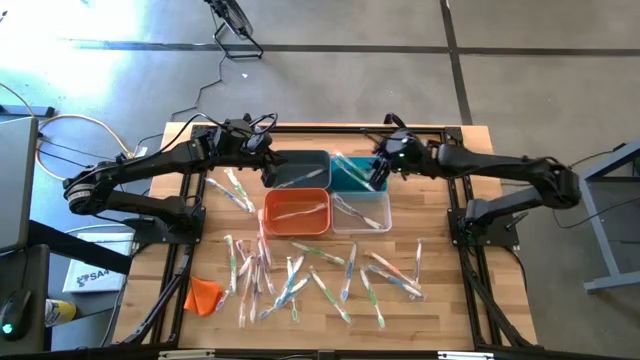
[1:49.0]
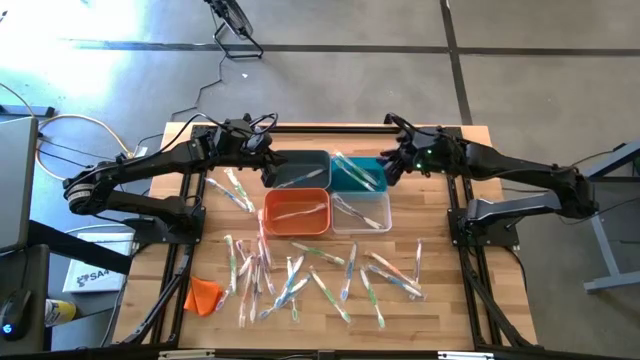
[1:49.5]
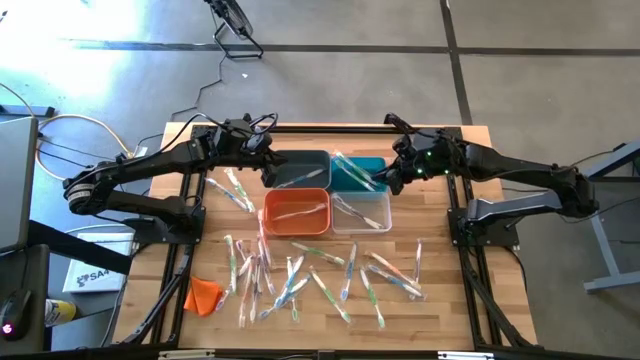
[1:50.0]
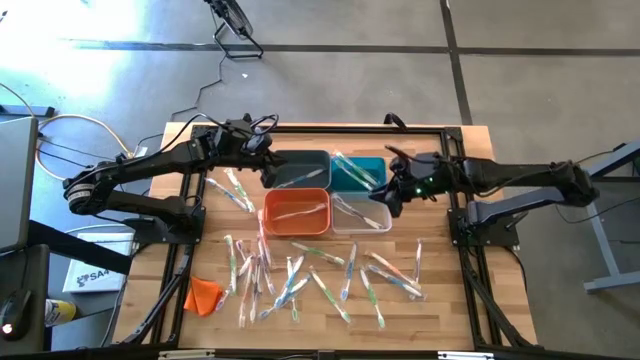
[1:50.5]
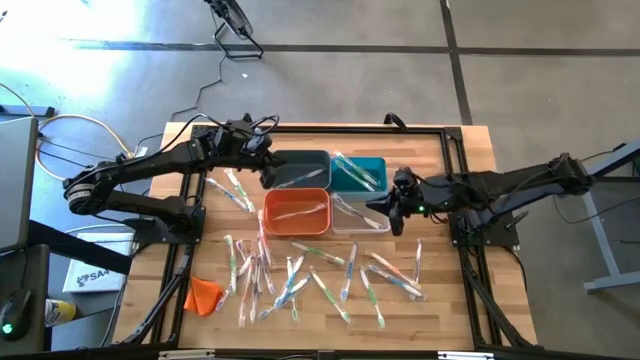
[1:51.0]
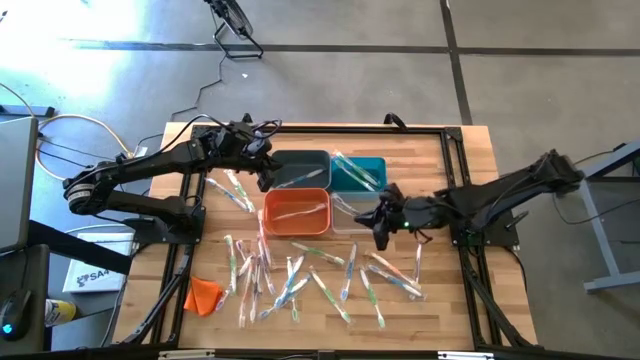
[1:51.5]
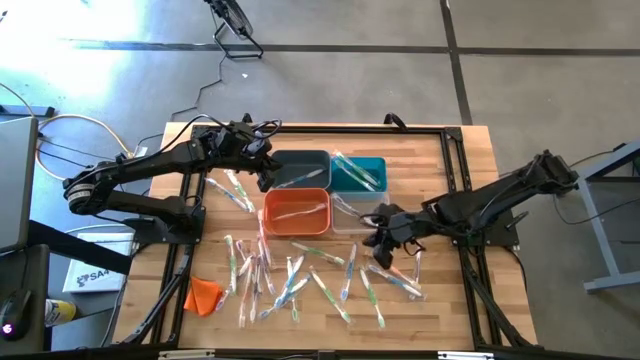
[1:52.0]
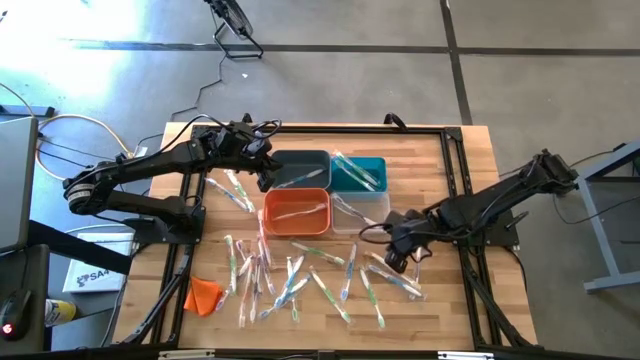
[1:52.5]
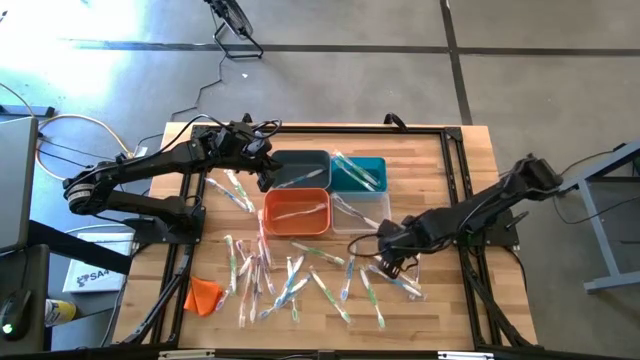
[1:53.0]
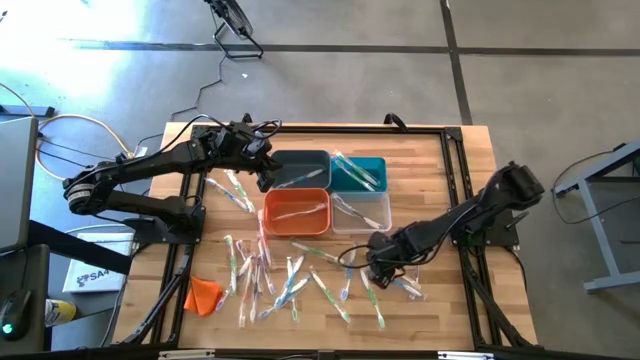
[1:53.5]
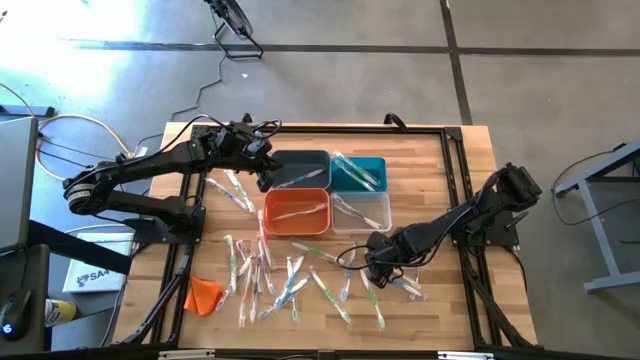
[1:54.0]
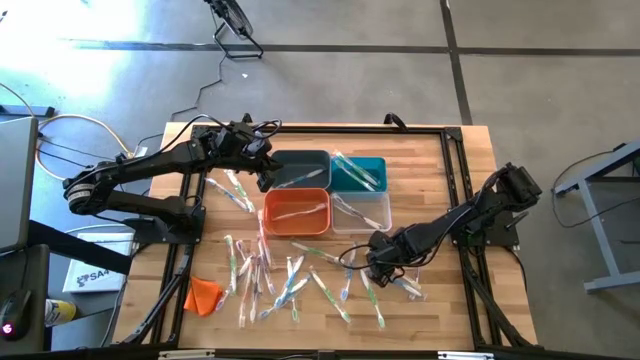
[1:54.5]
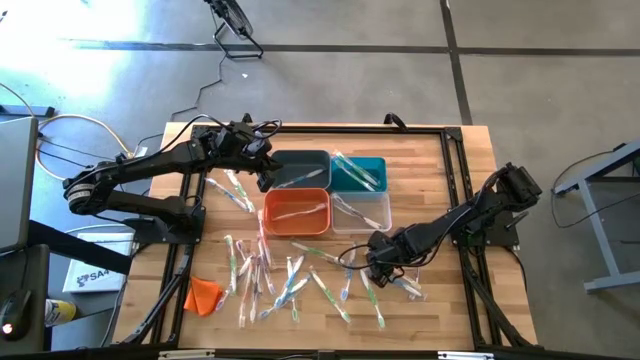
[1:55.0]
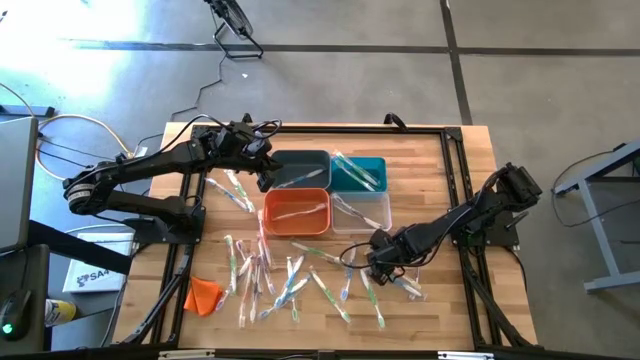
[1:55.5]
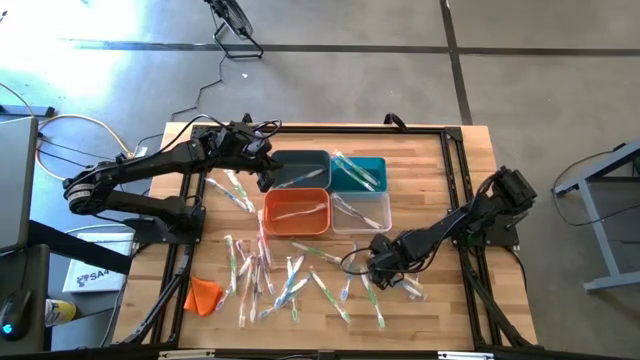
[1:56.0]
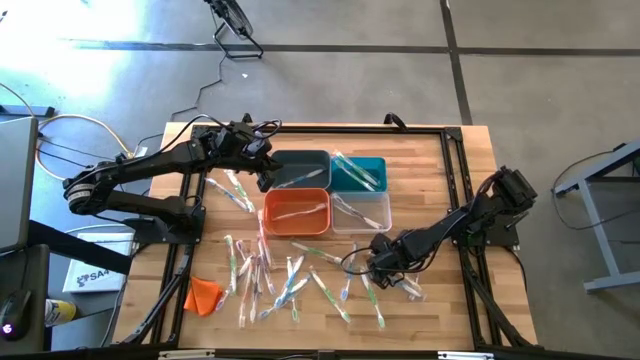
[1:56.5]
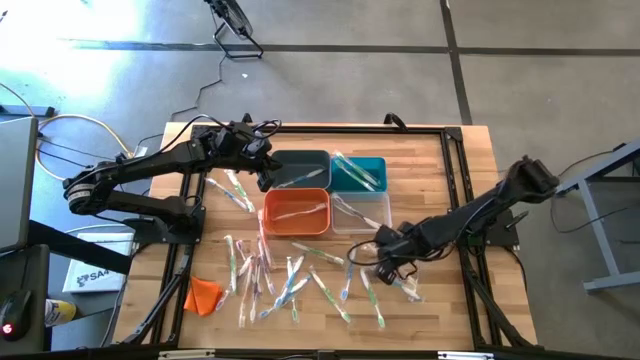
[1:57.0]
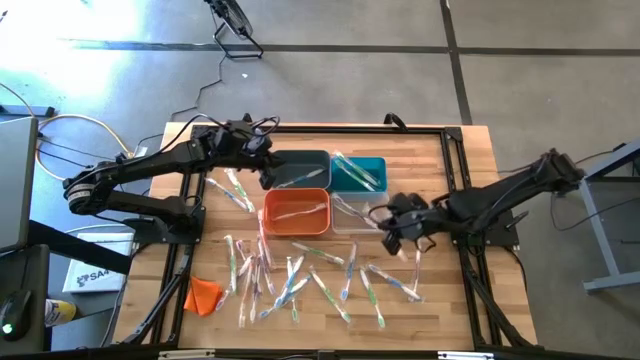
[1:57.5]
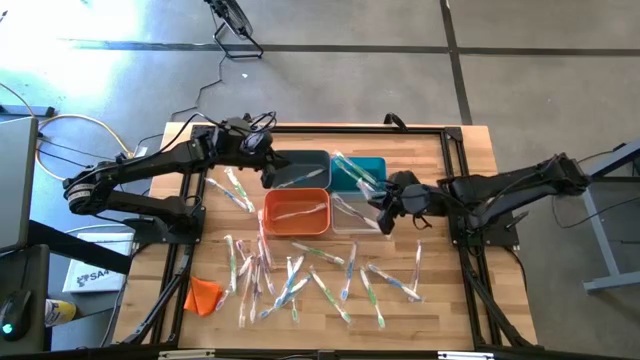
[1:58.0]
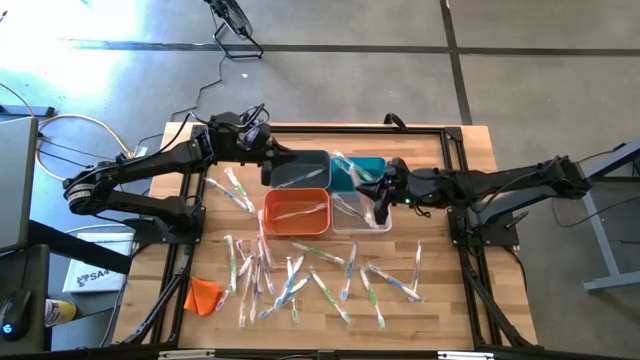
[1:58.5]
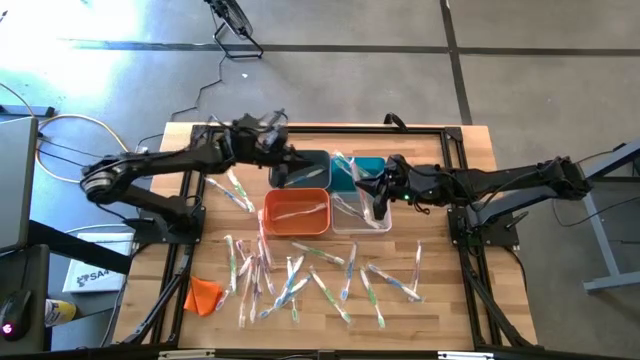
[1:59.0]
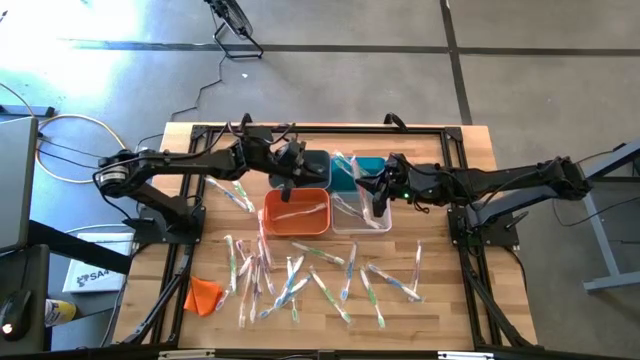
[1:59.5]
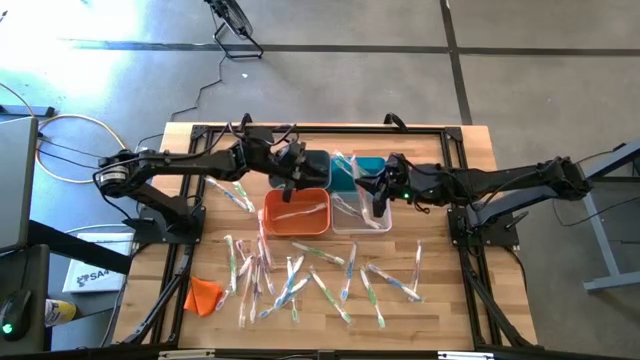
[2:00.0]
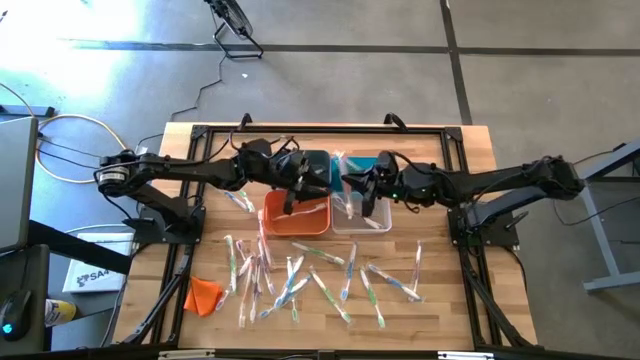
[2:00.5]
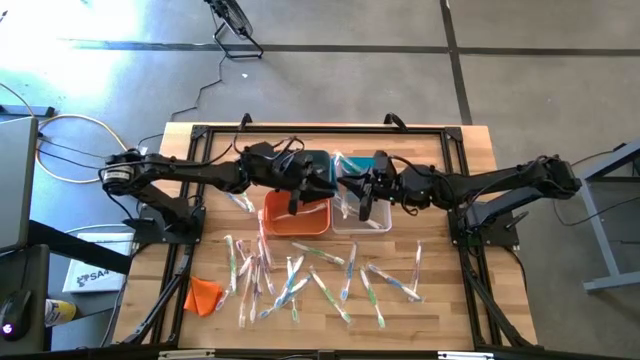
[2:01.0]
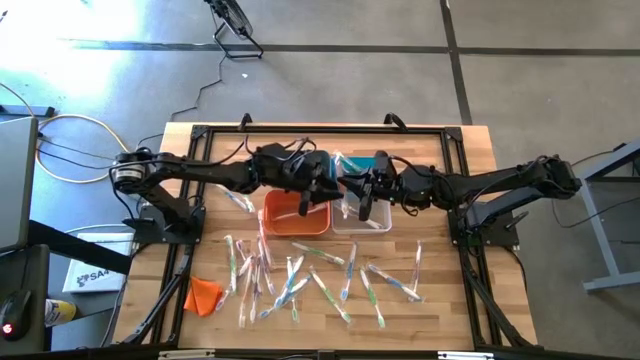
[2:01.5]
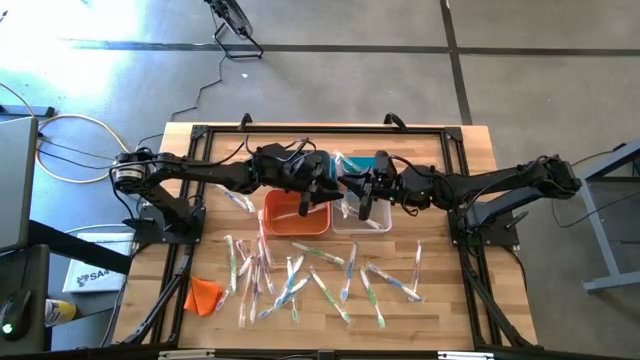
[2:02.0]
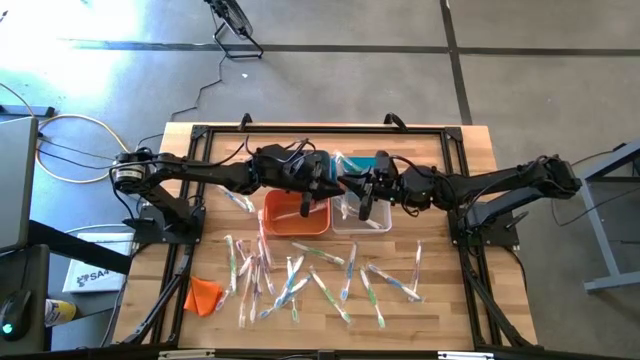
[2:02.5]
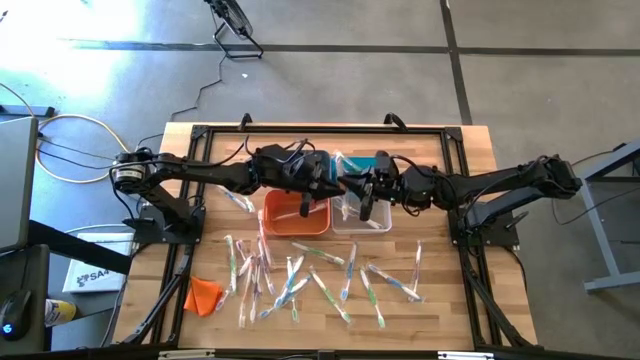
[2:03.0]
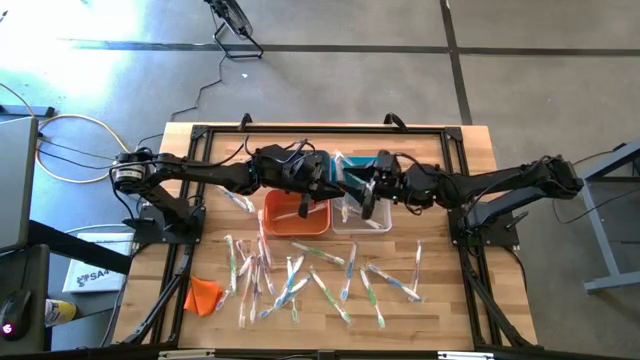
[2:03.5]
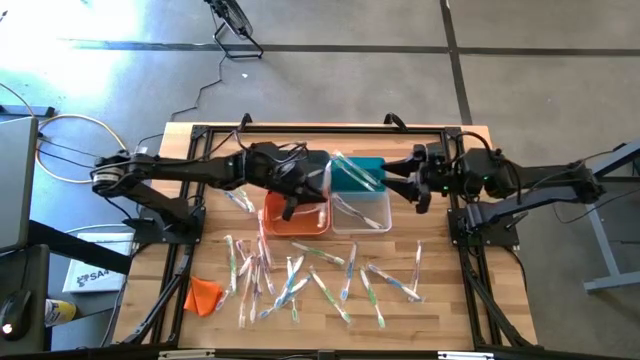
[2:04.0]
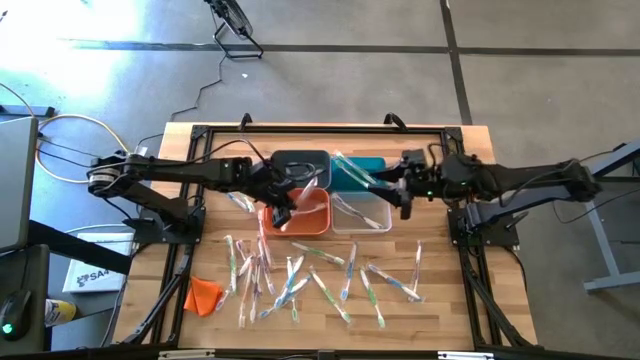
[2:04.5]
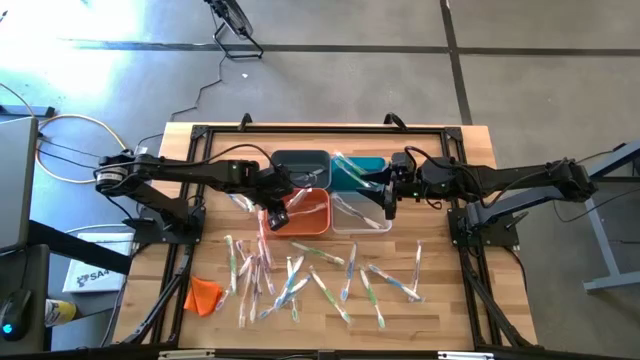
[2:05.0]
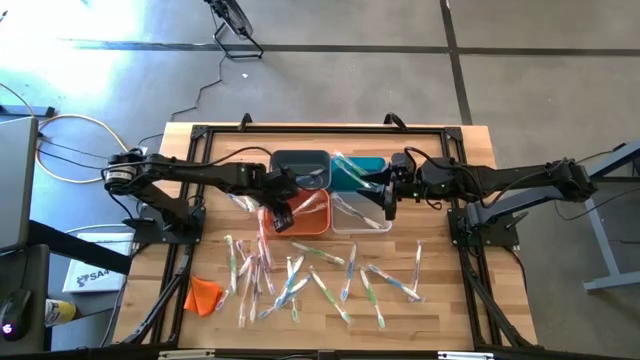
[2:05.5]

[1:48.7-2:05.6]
Task: Pick & Place Toothbrushes
Put the orange toothbrush into the orange bin

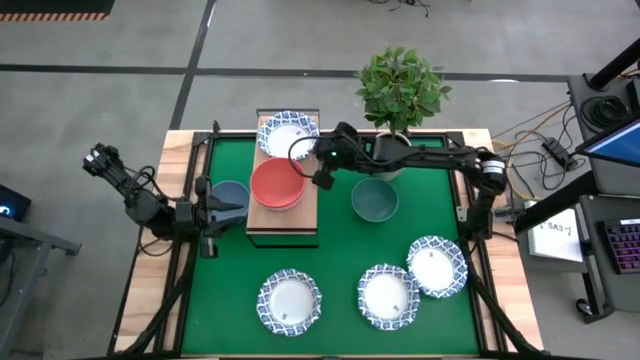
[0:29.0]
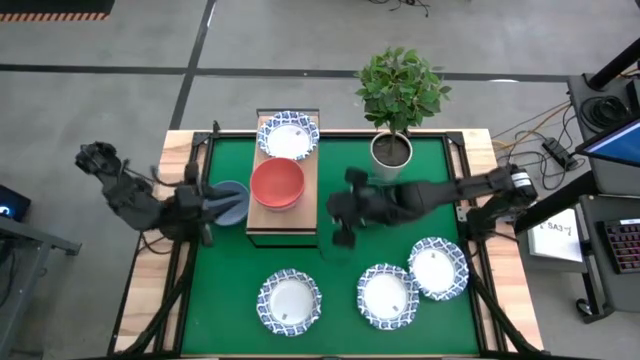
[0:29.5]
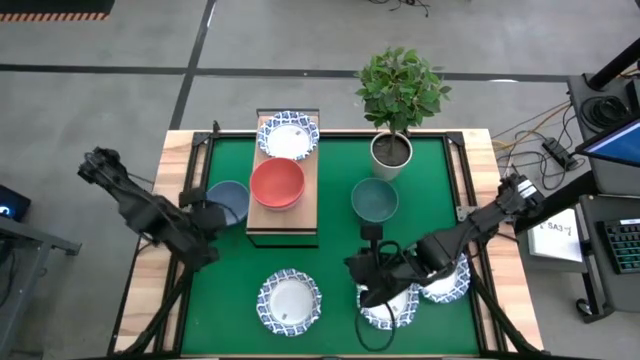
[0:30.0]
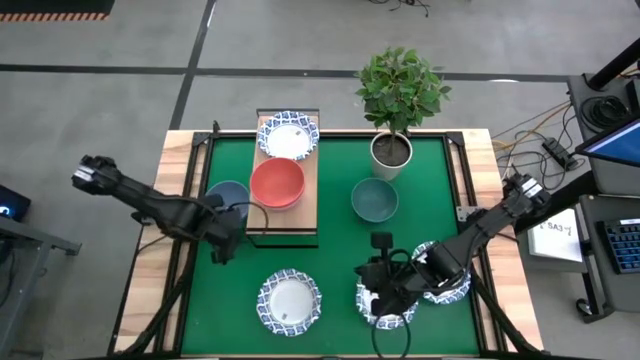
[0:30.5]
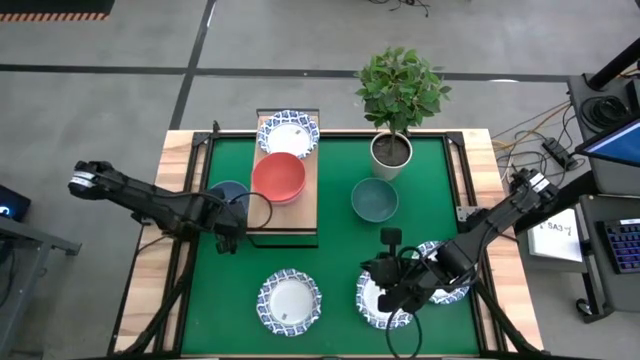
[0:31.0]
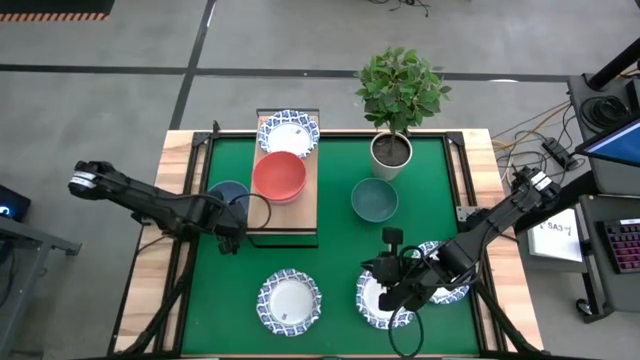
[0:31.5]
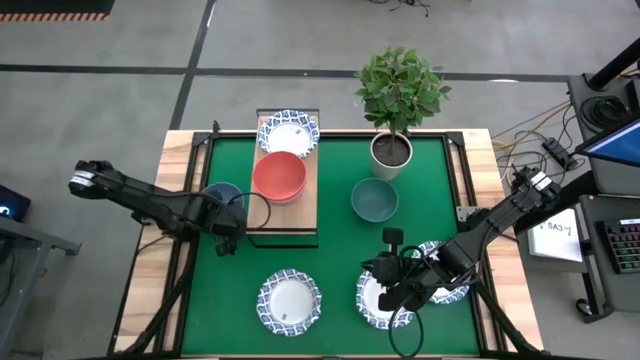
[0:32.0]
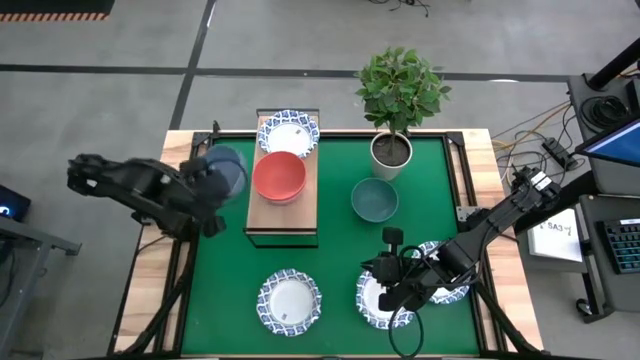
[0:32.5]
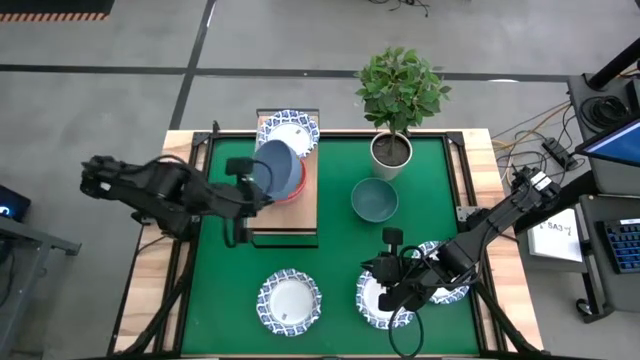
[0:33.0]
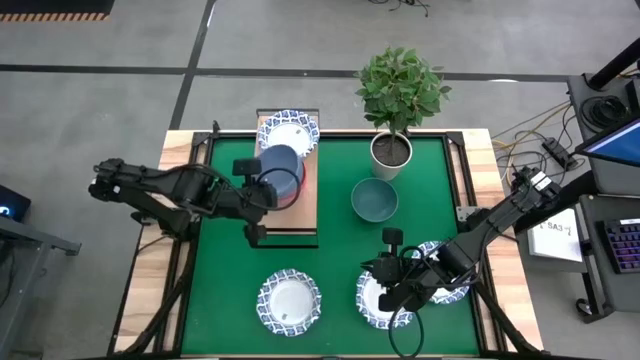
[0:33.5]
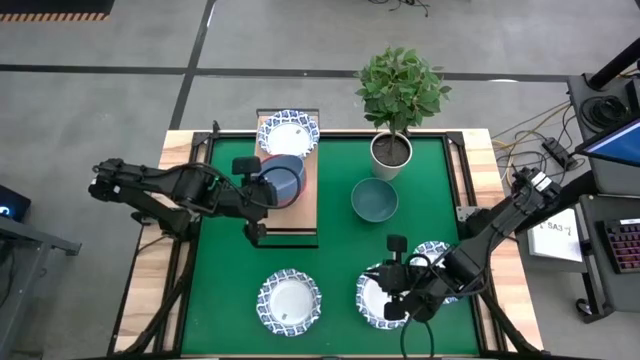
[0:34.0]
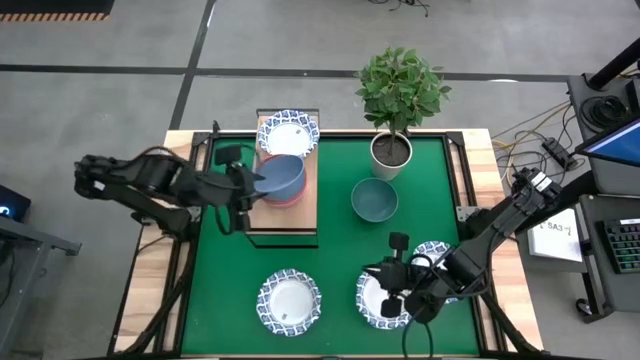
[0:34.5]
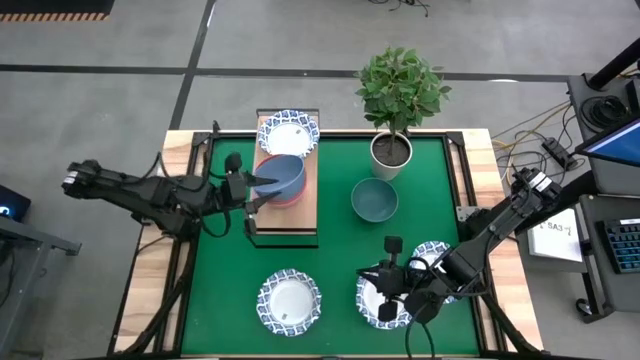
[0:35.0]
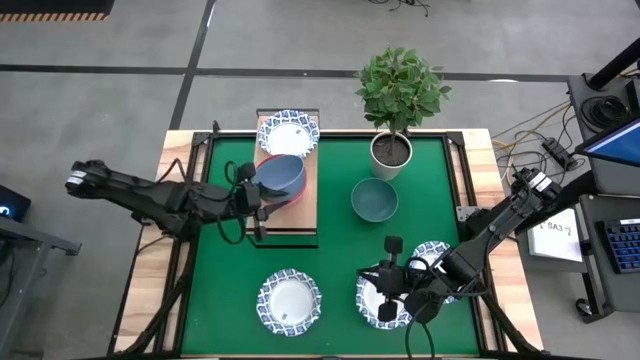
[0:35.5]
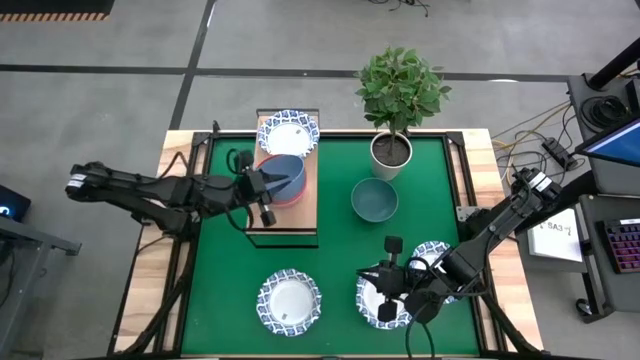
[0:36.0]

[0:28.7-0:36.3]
Task: Place and stack bowls onto a shelf
Stack the blue bowl on top of the orange bowl on the shelf
